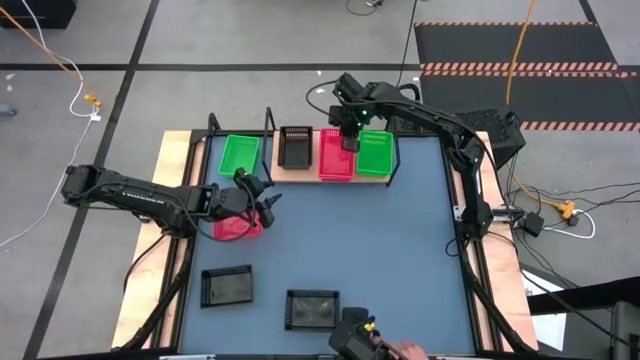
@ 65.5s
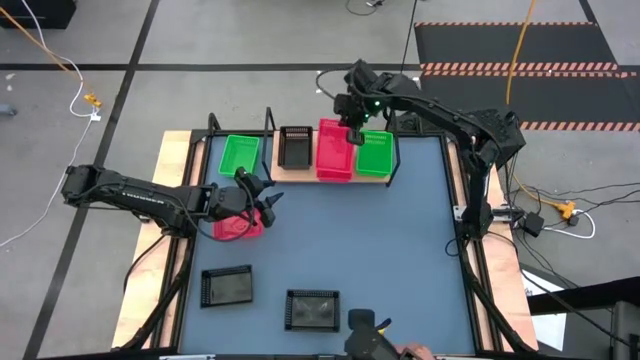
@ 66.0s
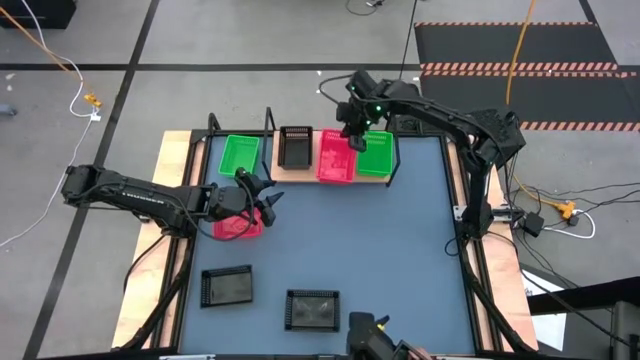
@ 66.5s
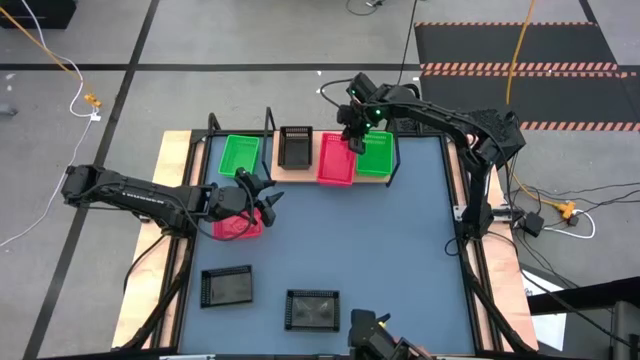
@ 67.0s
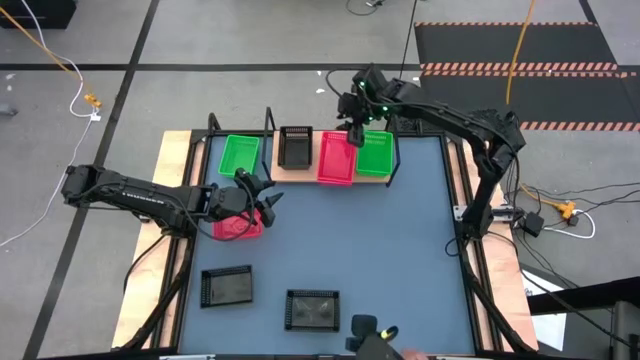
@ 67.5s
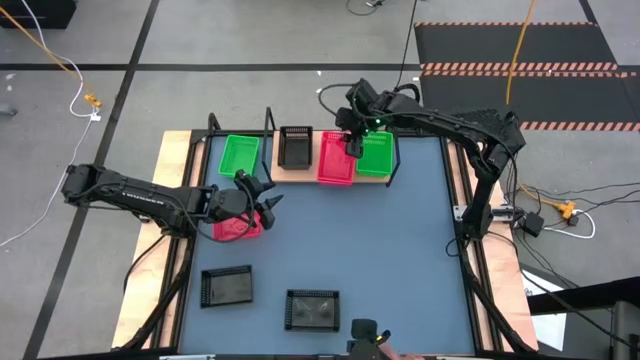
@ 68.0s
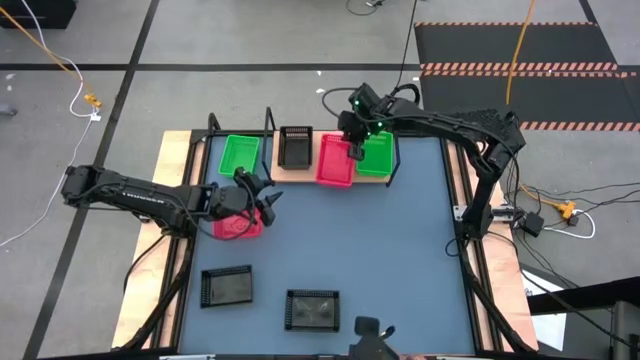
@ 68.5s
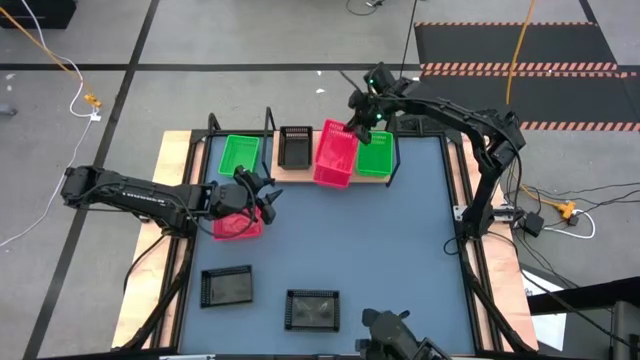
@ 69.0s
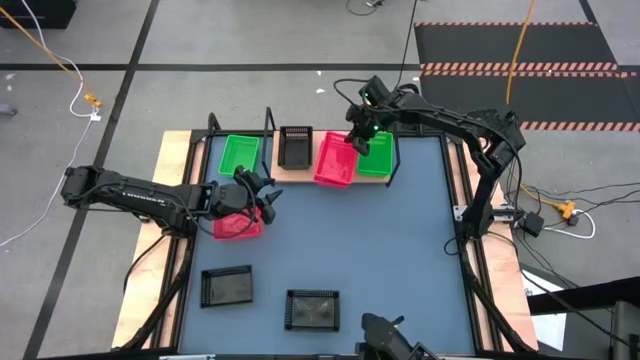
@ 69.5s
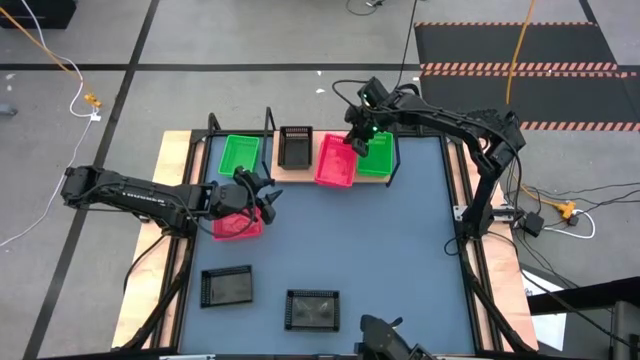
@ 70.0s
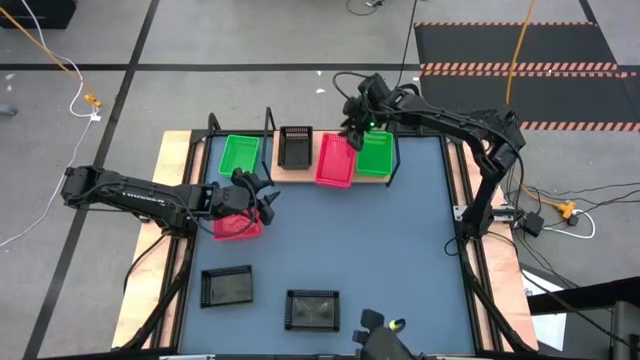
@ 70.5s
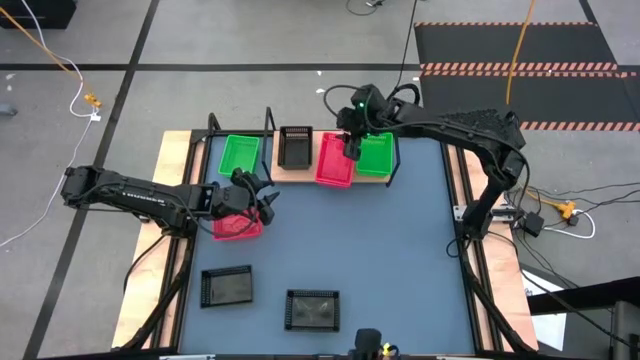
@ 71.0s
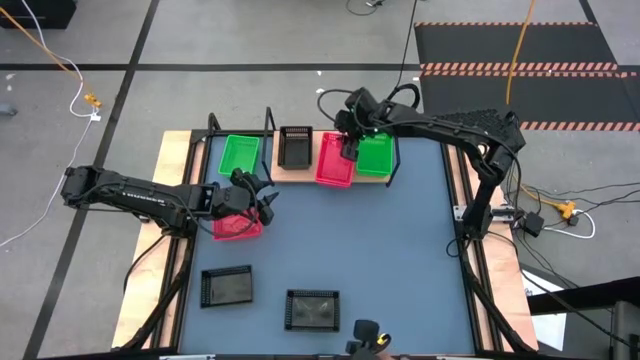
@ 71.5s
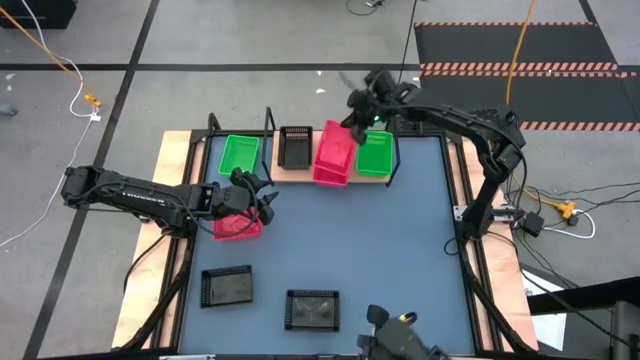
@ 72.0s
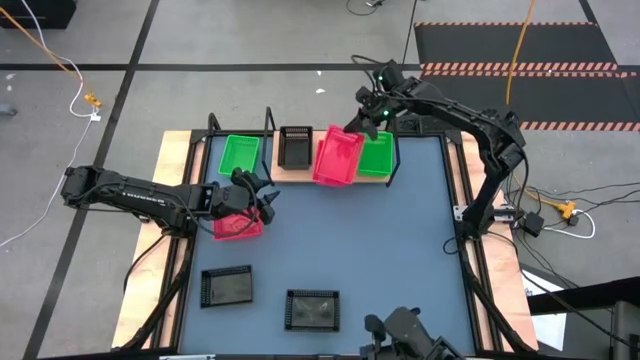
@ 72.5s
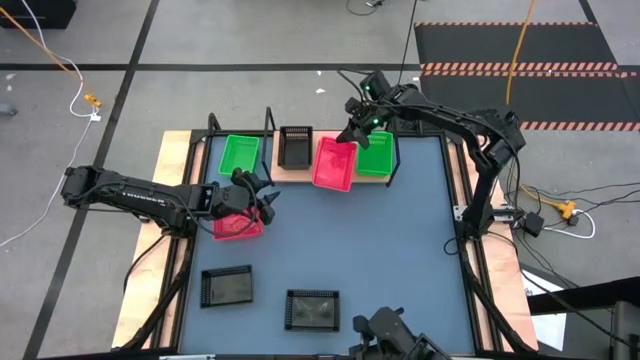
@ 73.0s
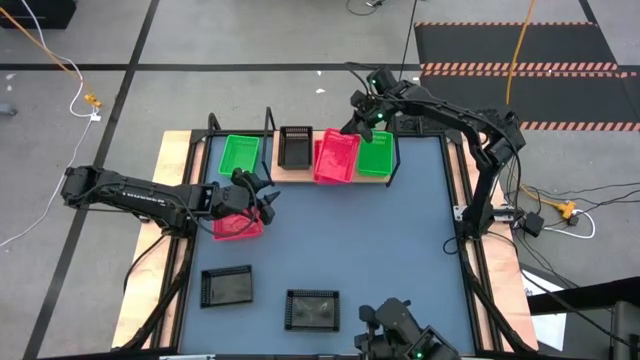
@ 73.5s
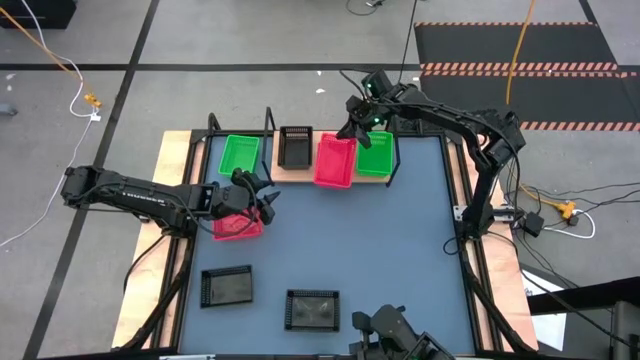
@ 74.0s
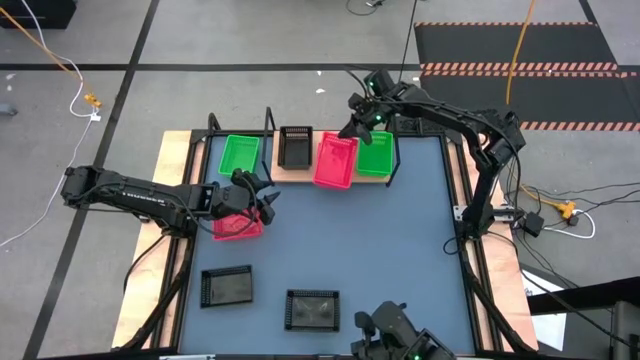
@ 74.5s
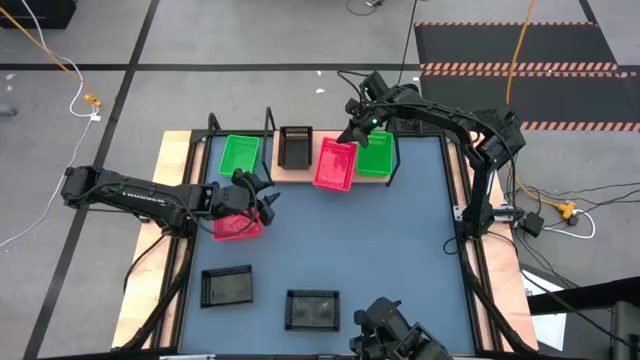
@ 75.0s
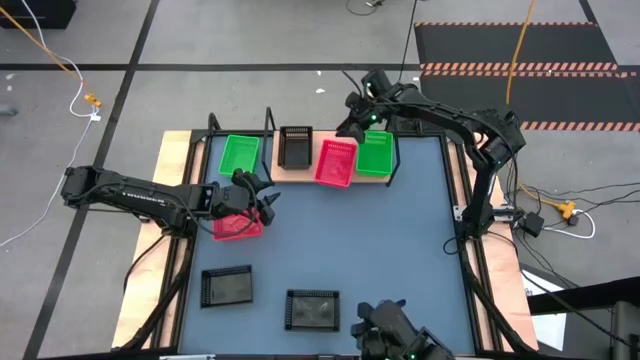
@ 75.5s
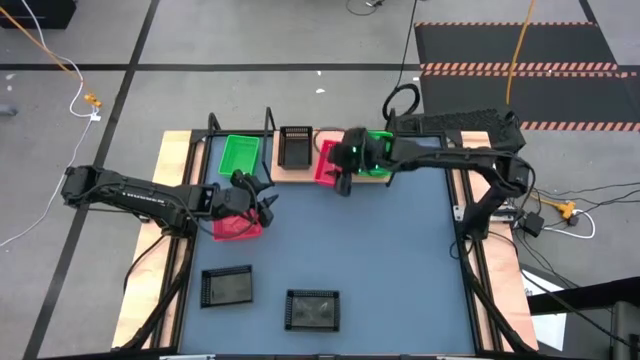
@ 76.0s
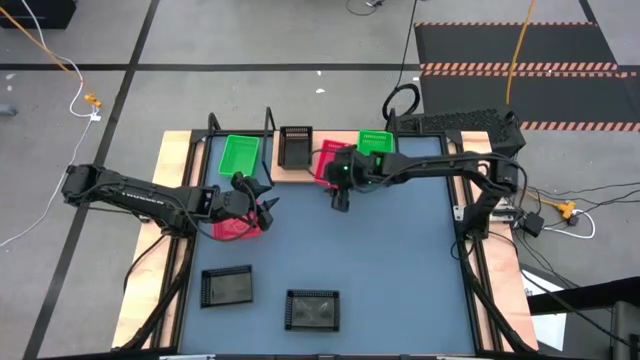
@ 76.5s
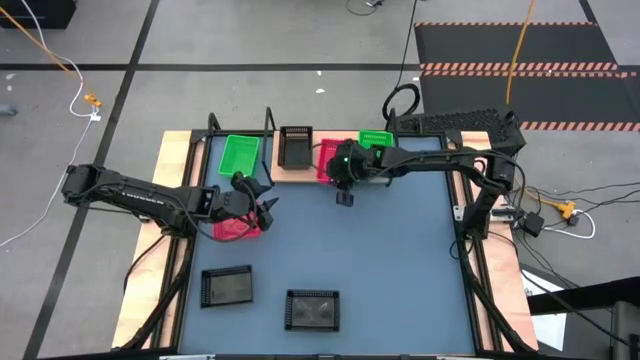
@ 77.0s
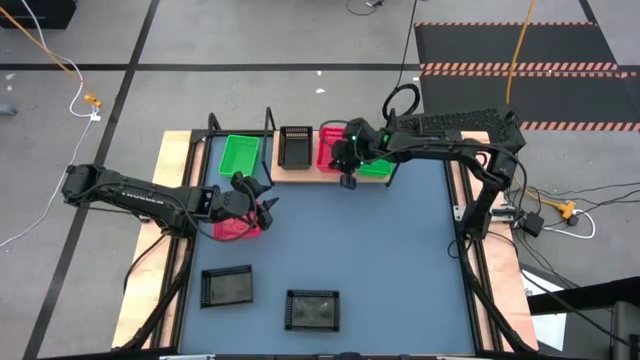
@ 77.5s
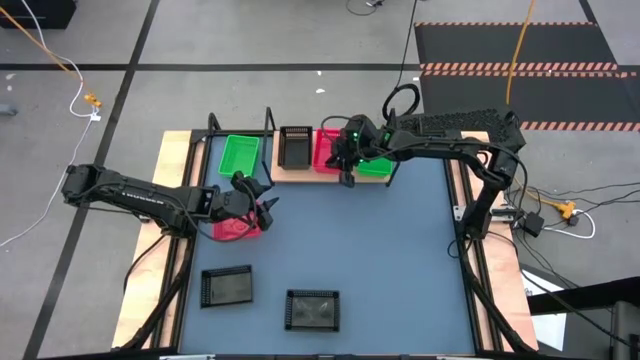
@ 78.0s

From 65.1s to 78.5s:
Task: Stack baskets on shelf by color
Stack the right red bin on top of the red bin on the shelf

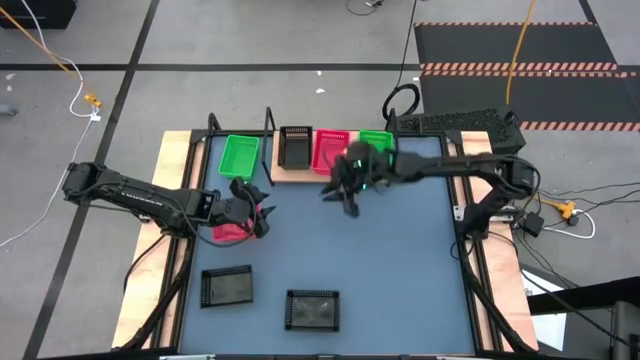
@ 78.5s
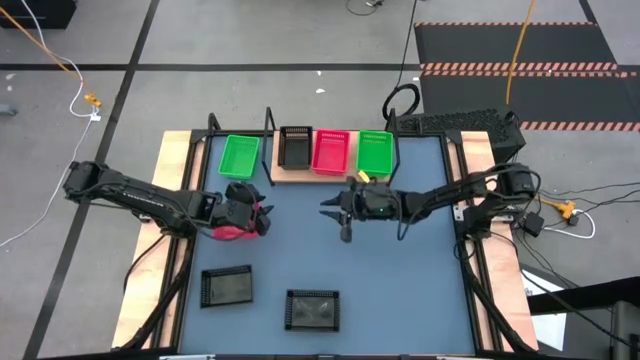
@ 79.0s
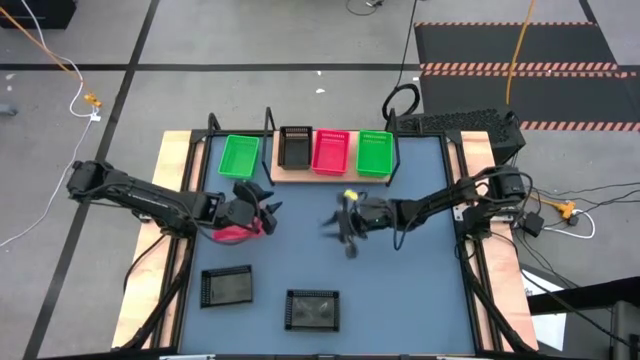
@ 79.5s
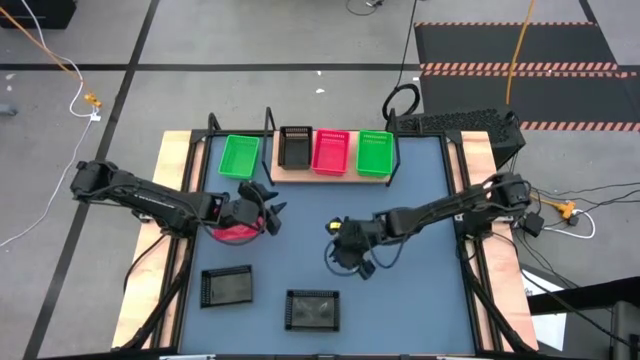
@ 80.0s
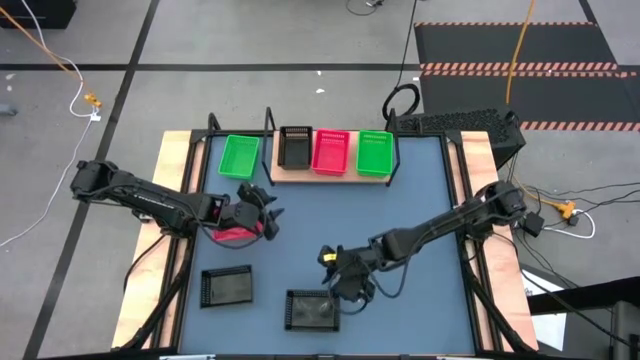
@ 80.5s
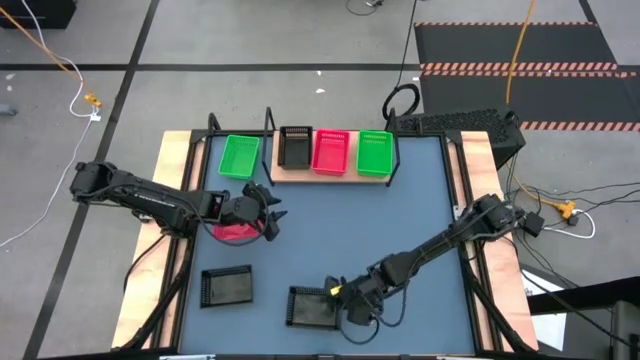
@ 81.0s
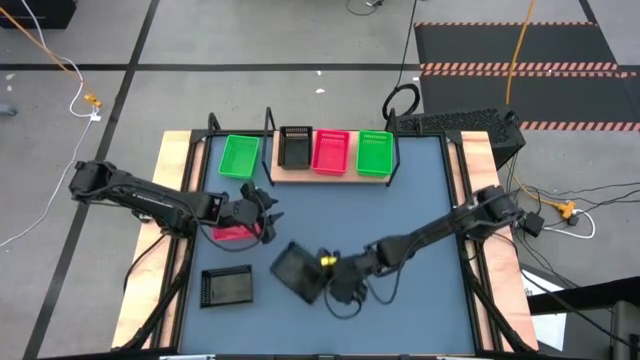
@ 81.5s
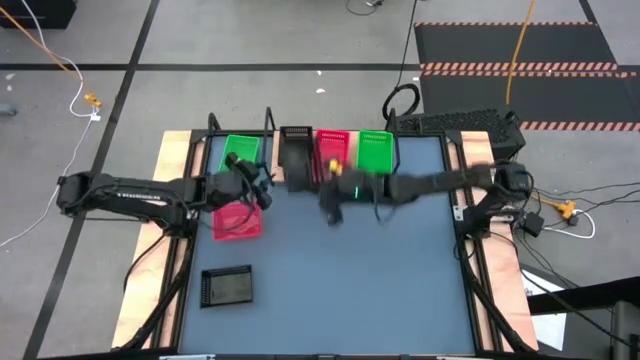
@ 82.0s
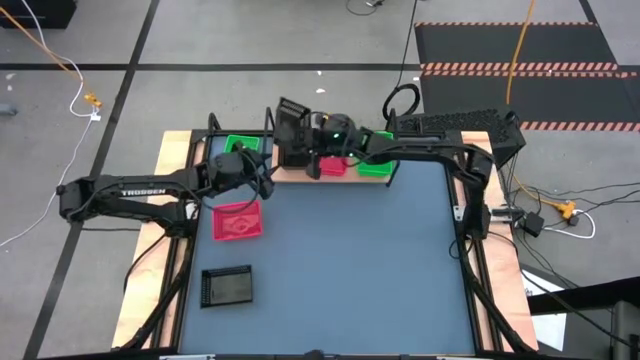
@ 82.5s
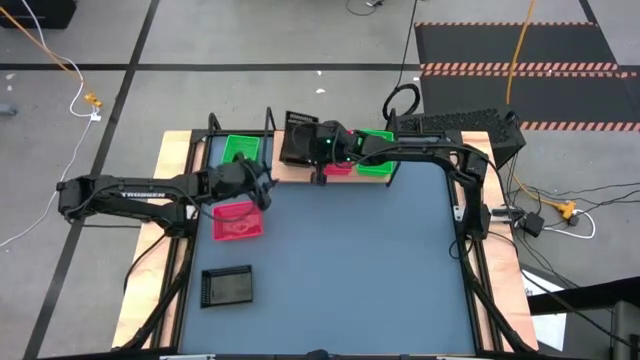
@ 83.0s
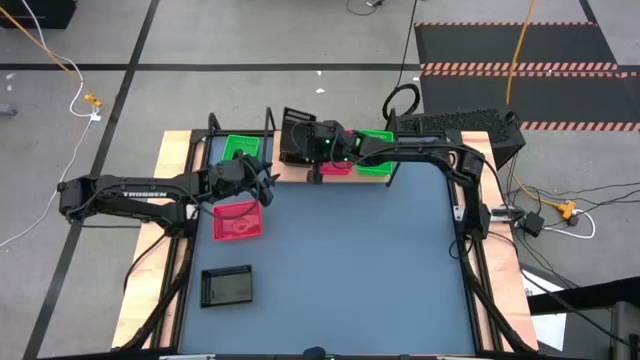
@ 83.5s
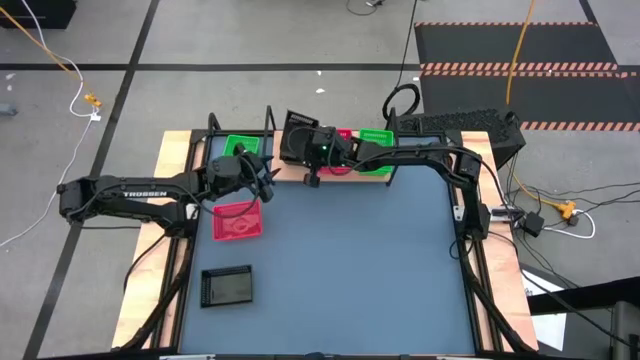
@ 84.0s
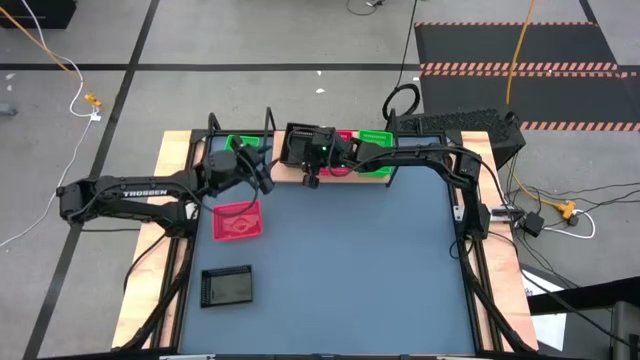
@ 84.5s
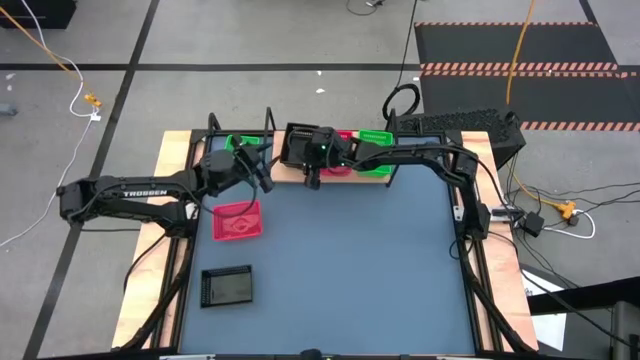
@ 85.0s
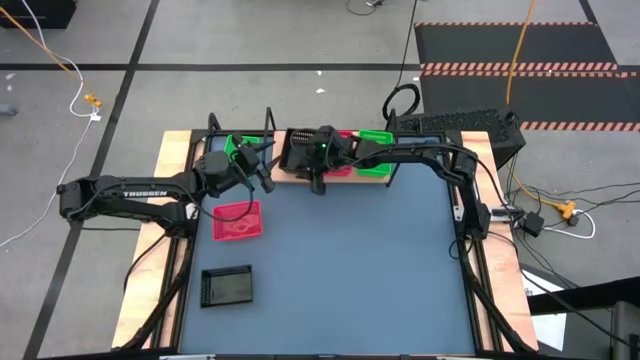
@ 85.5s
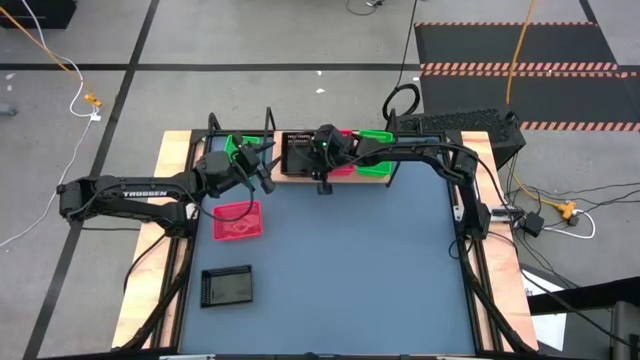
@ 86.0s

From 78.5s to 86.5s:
Stack the right black bin on top of the black bin on the shelf

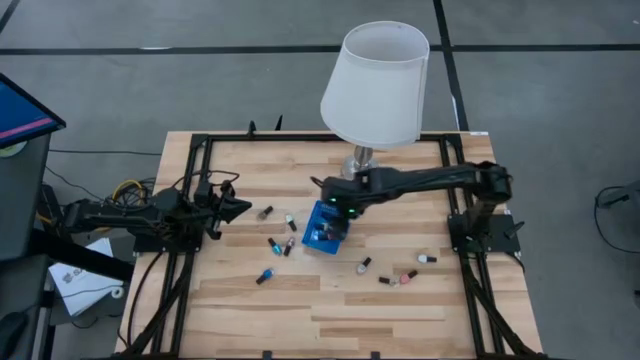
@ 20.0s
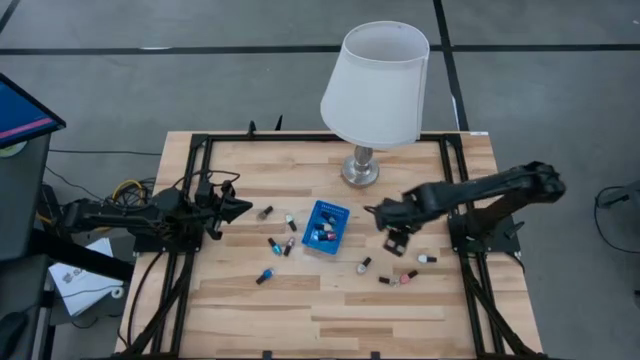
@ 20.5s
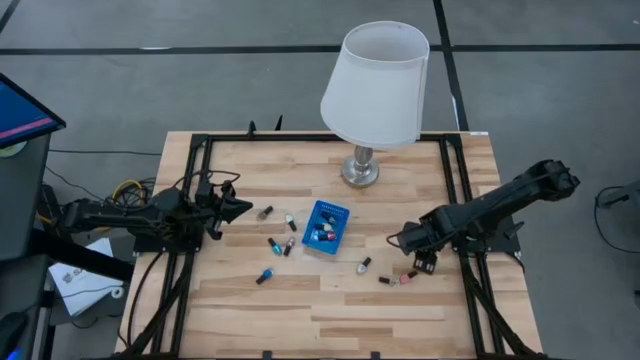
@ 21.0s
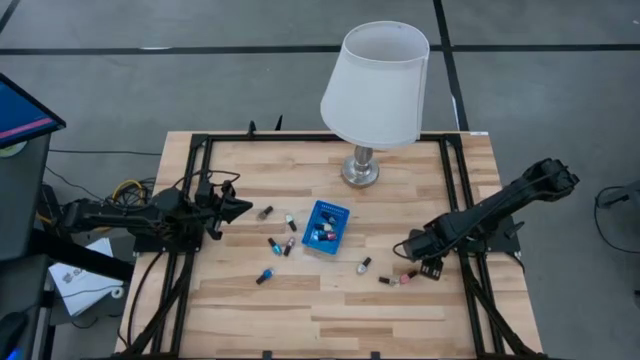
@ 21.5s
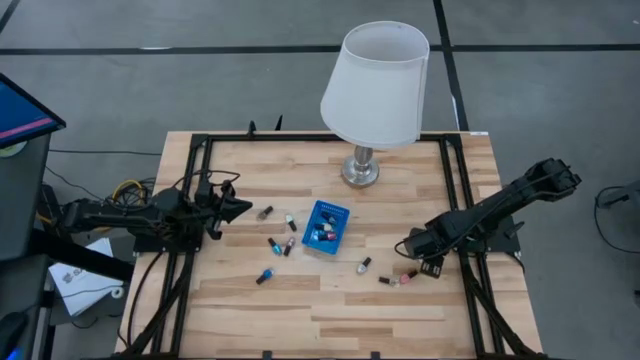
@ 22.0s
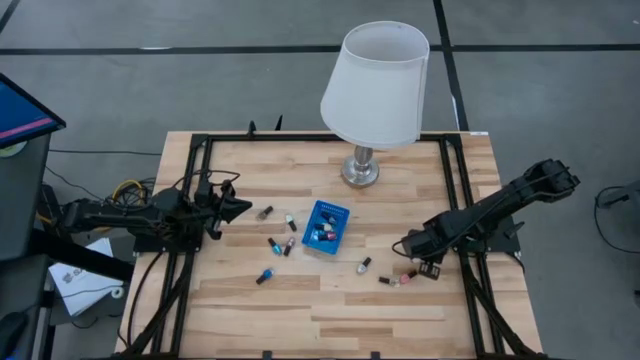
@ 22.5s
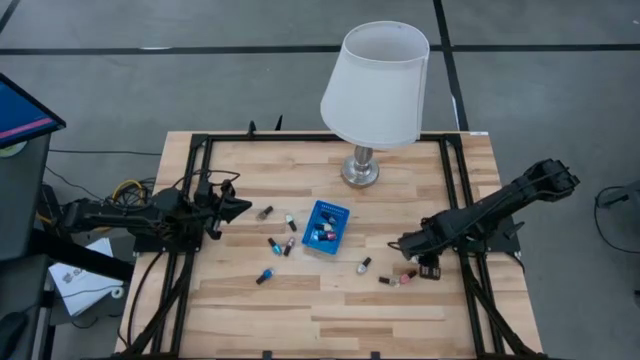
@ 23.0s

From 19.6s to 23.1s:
Task: Pick & Place Nail Polish
Put the right sky blue nail polish into the blue basket
